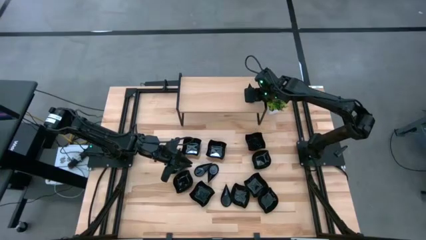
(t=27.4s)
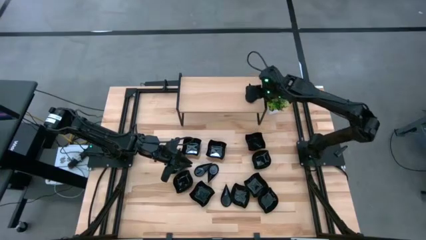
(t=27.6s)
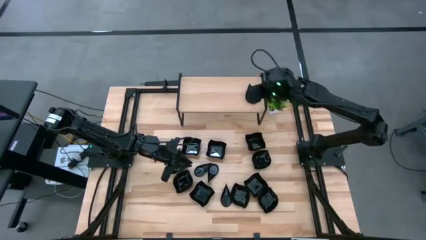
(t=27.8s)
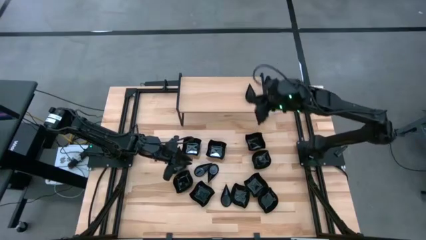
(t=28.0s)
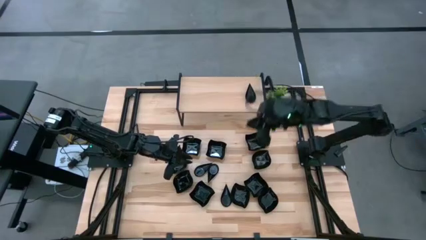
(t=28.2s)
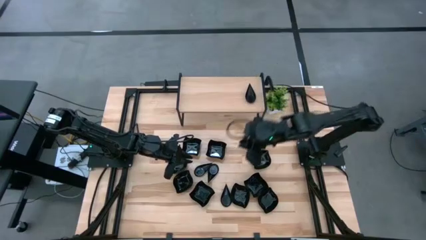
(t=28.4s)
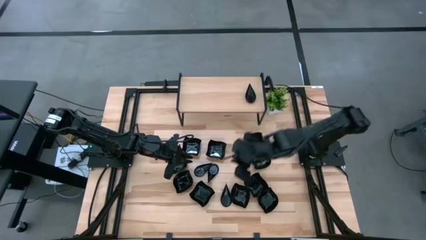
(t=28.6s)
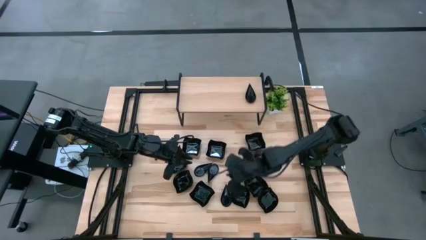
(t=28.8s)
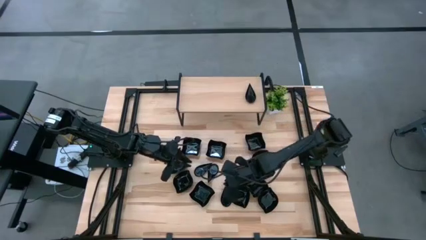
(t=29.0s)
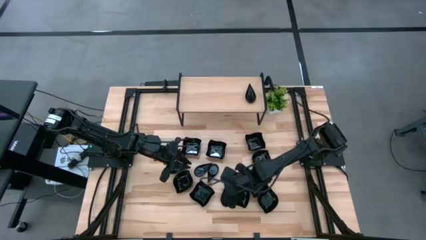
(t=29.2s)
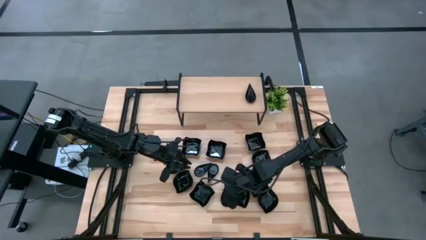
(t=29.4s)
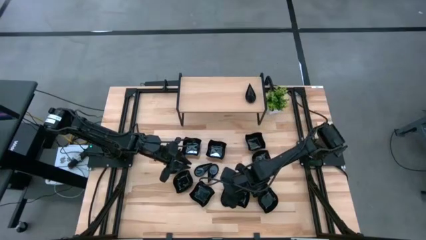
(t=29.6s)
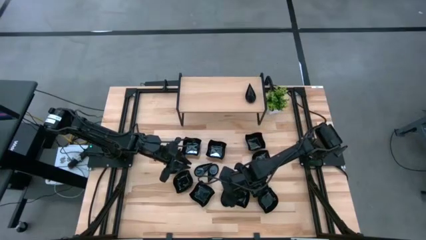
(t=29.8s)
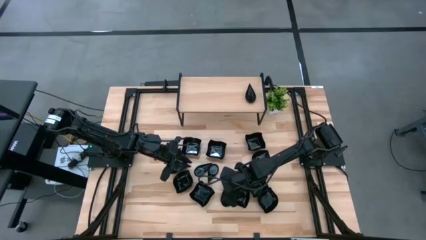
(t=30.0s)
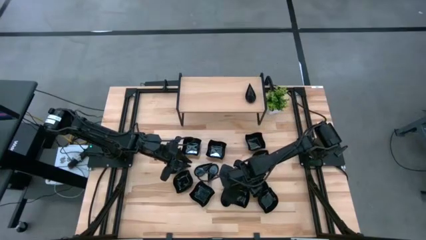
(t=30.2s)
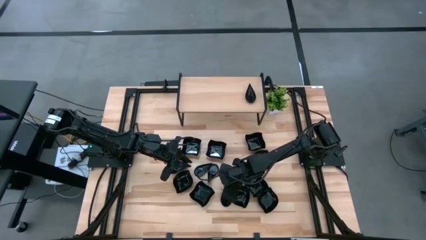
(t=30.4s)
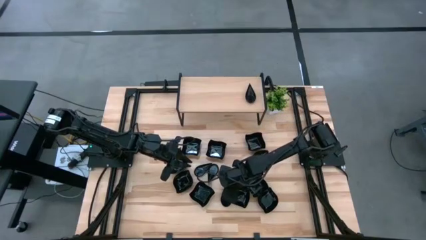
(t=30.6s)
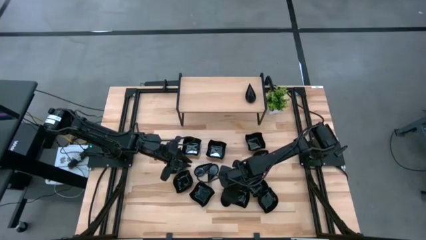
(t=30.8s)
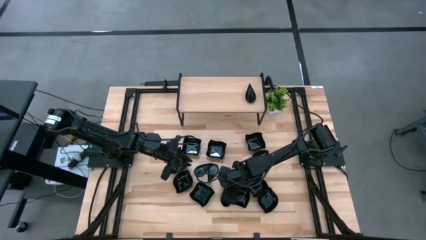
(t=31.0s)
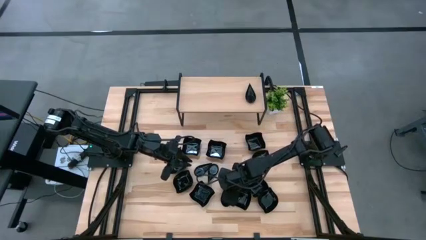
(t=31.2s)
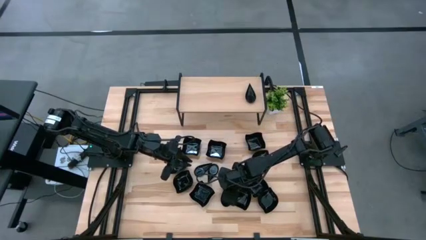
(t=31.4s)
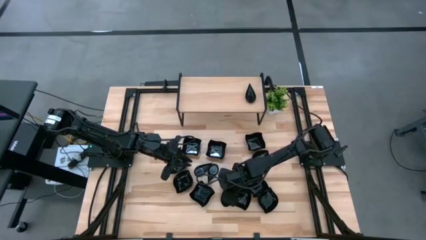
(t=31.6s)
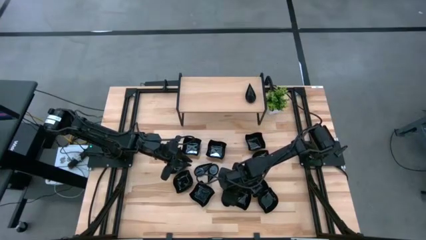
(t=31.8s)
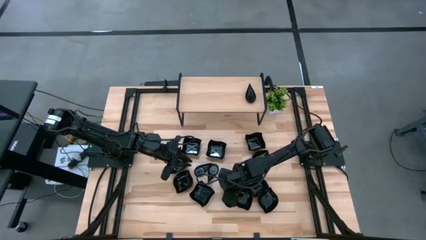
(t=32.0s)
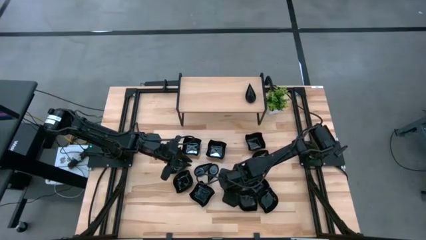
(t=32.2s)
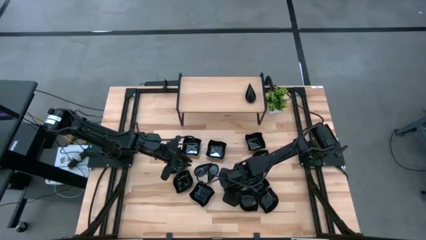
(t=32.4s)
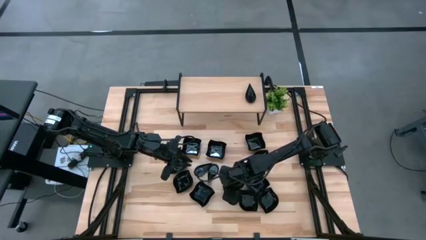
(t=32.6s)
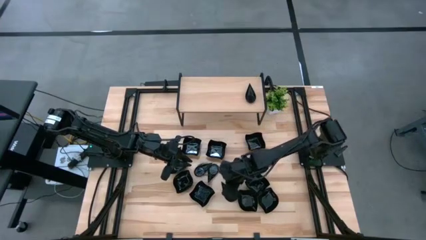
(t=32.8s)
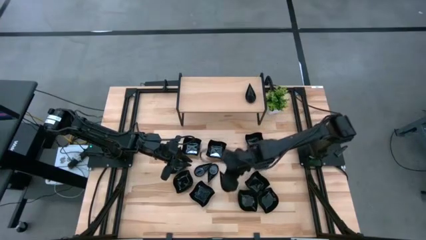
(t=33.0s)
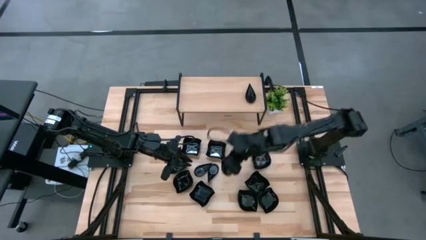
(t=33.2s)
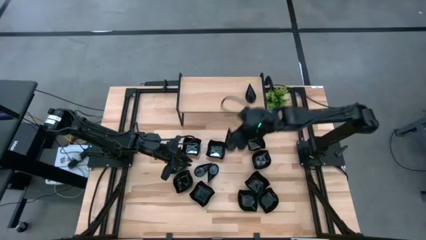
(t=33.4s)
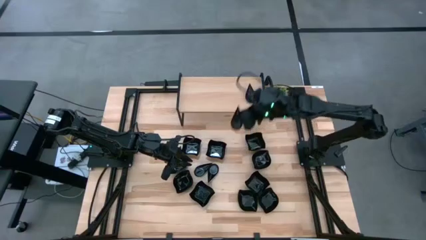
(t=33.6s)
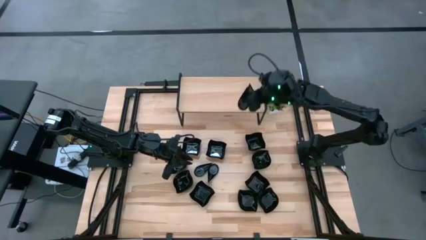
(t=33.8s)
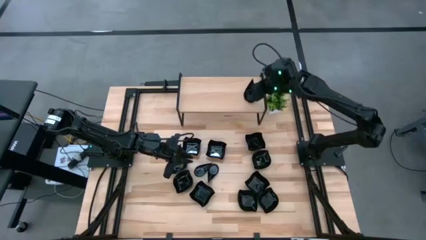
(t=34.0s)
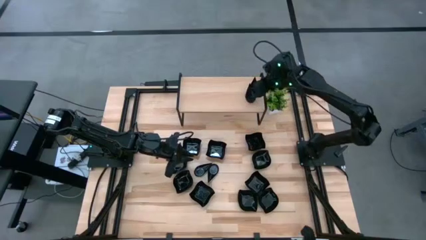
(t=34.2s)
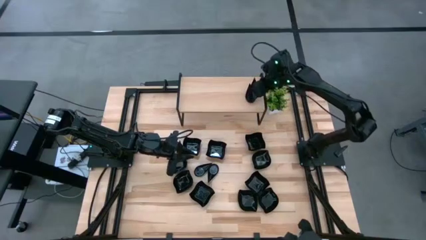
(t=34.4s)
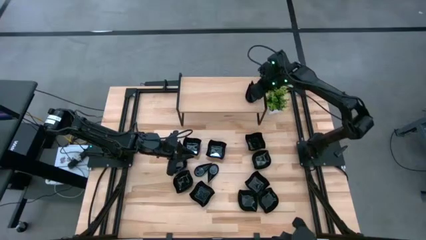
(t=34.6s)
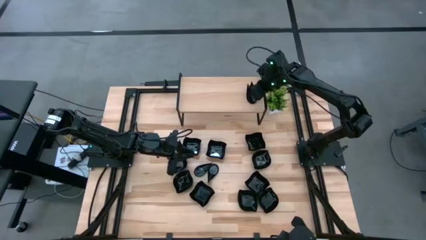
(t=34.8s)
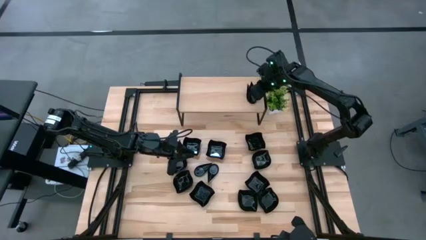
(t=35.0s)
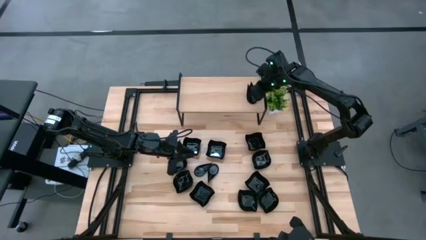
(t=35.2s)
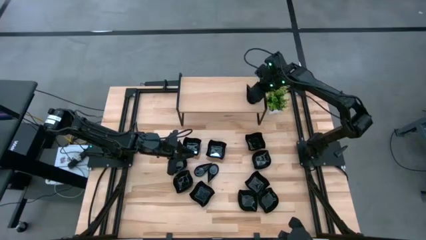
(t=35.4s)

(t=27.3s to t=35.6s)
Task: Pick & Place Mini shaped plates
Stack the black drop shaped plate on top of the black drop shaped plate on the shelf

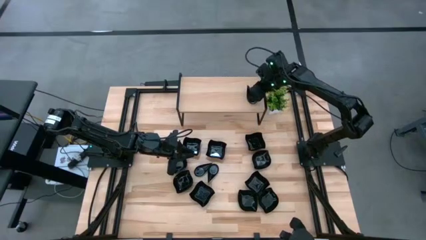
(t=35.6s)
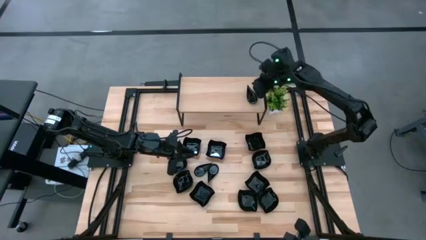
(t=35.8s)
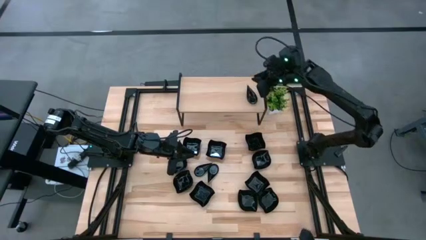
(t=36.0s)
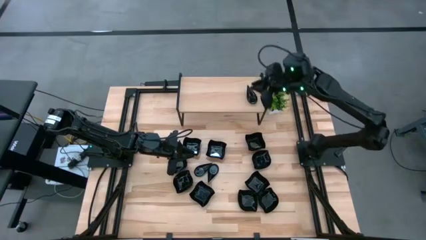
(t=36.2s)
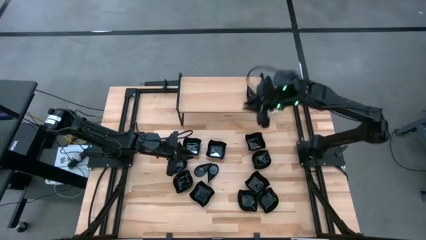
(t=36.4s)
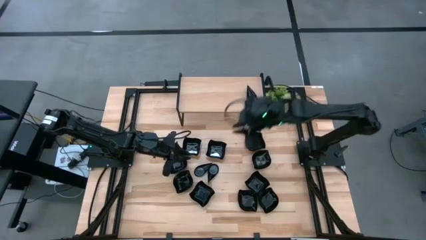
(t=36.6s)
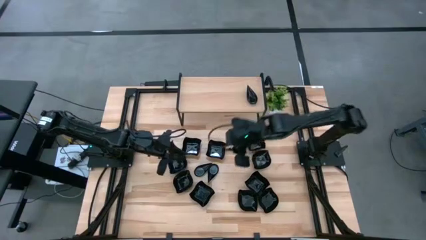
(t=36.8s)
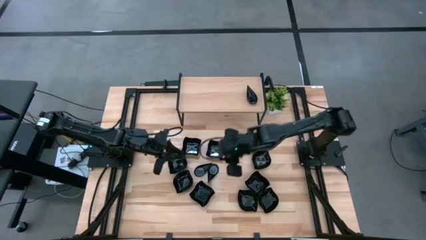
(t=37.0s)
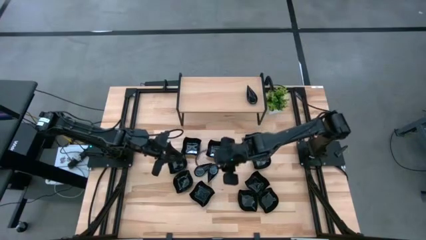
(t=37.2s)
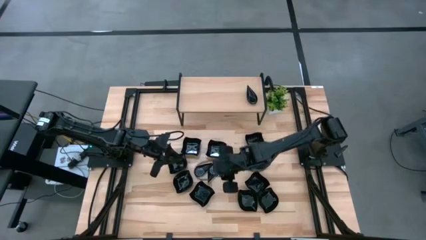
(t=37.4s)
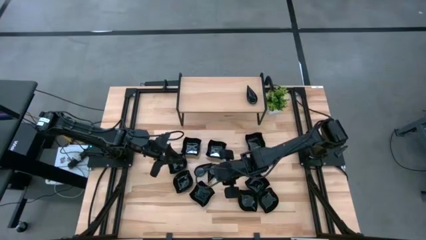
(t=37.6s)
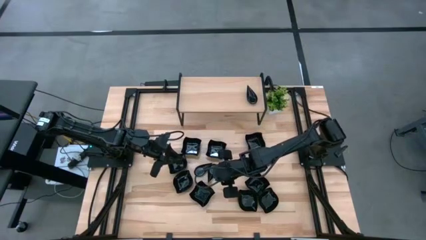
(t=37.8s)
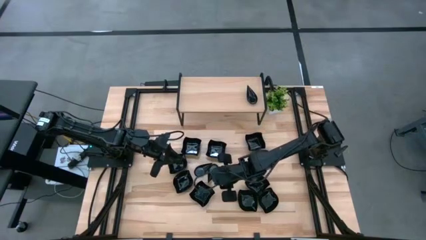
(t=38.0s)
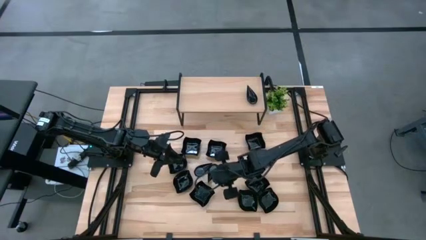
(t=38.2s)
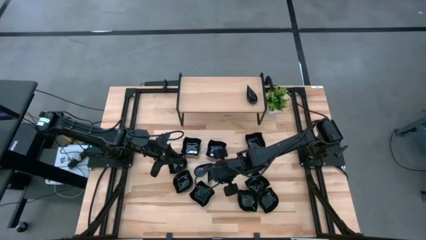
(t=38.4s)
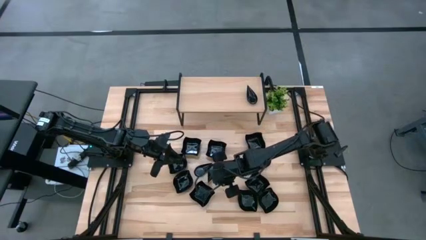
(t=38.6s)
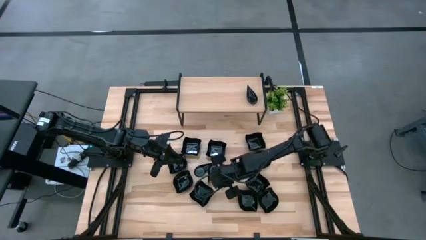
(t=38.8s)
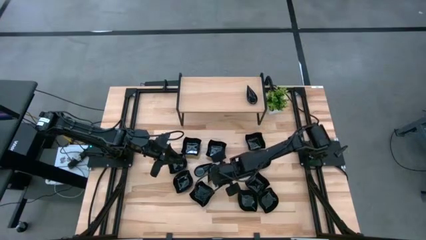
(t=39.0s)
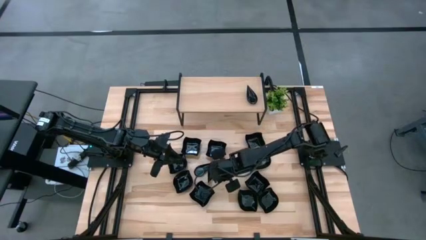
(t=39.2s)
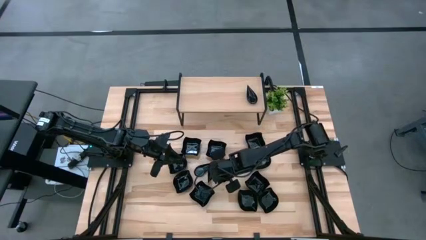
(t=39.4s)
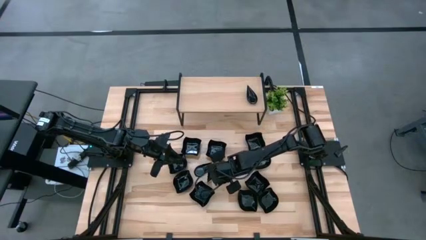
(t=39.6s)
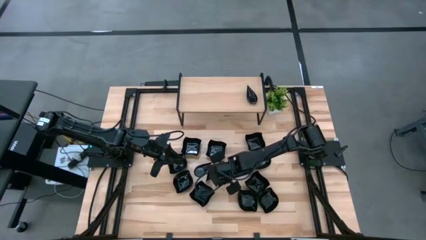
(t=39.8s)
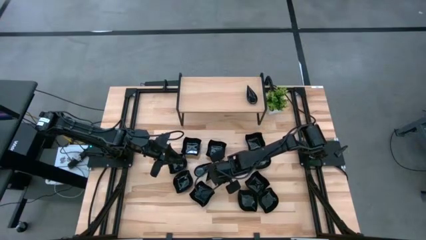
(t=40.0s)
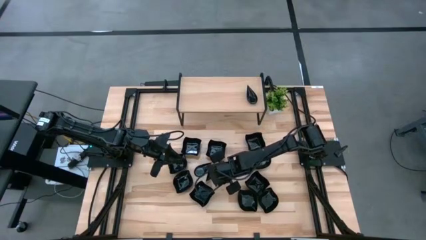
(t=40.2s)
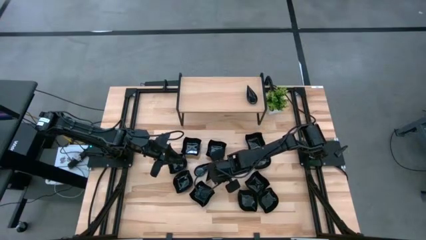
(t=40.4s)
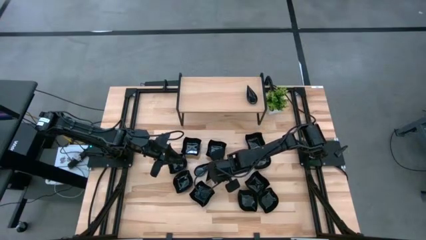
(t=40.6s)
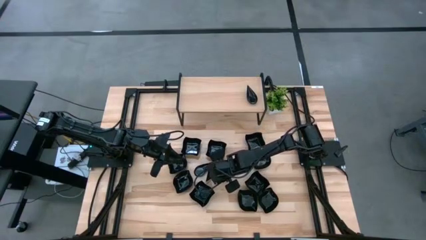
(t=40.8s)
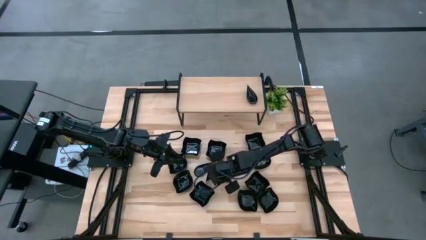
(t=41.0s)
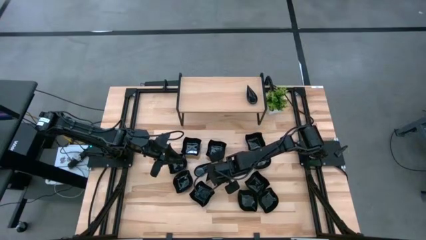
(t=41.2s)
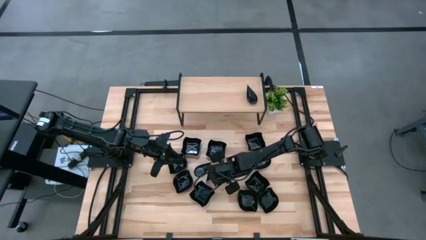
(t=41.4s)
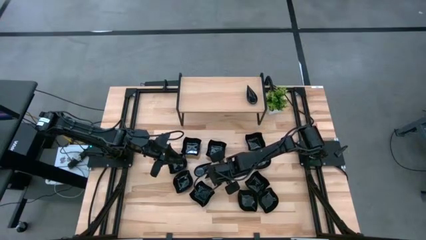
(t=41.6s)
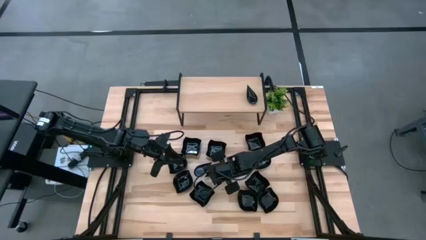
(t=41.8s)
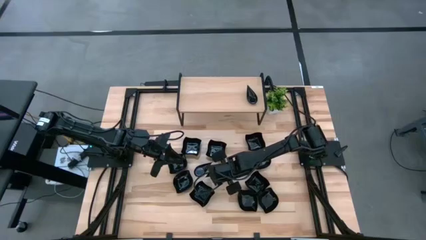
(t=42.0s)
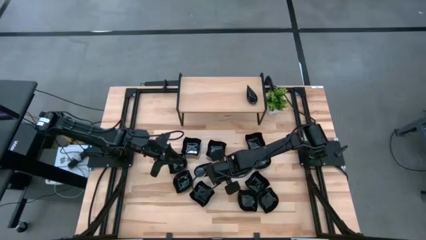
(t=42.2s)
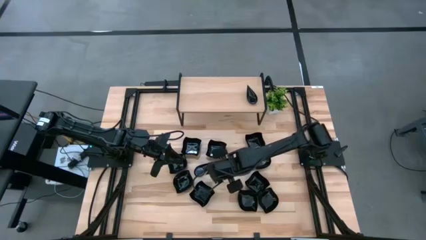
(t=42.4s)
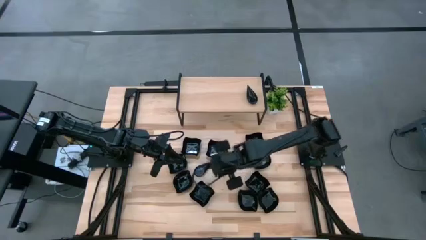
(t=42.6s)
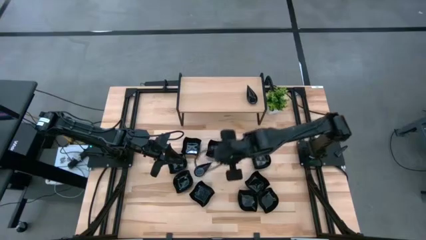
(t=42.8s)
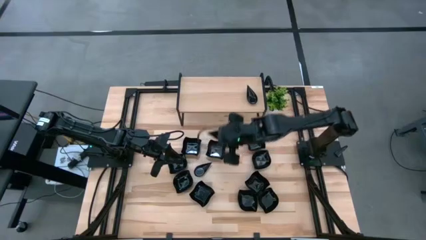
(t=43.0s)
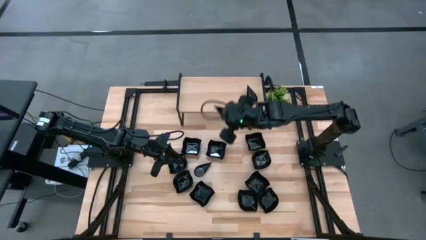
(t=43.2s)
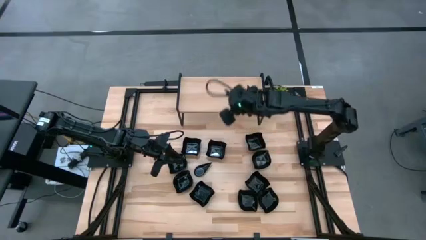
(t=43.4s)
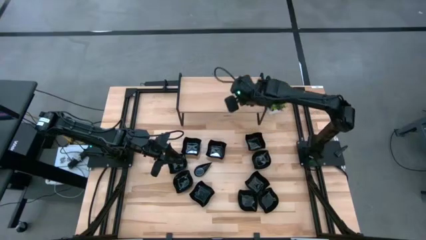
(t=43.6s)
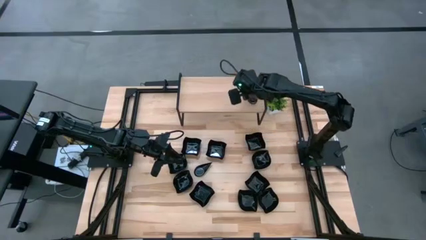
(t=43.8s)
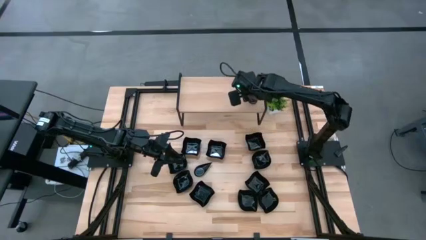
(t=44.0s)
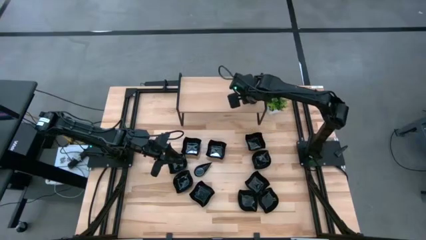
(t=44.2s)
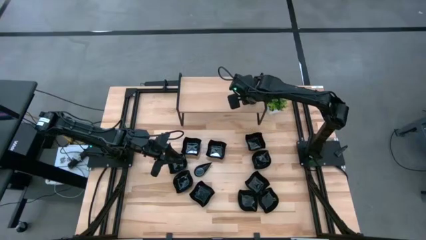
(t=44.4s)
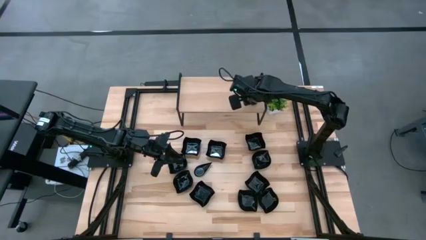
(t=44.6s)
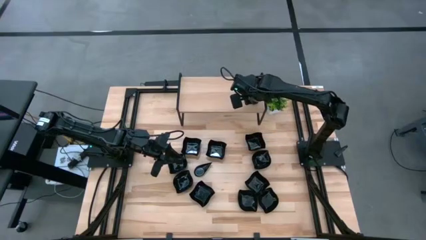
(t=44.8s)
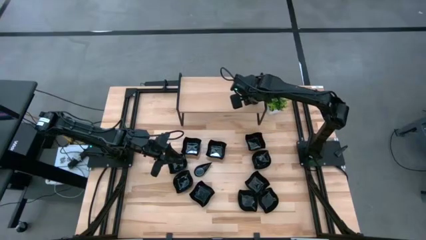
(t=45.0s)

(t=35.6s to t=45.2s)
Stack the black drop shaped plate on top of the black drop shaped plate on the shelf
